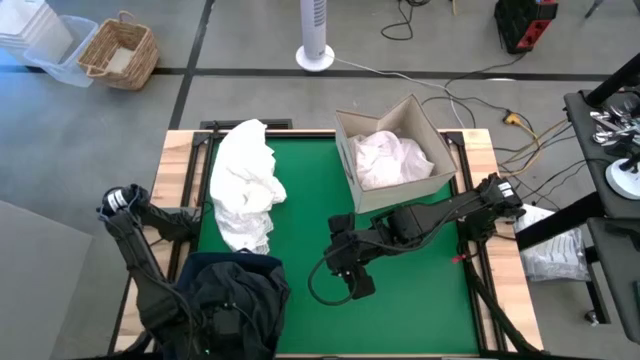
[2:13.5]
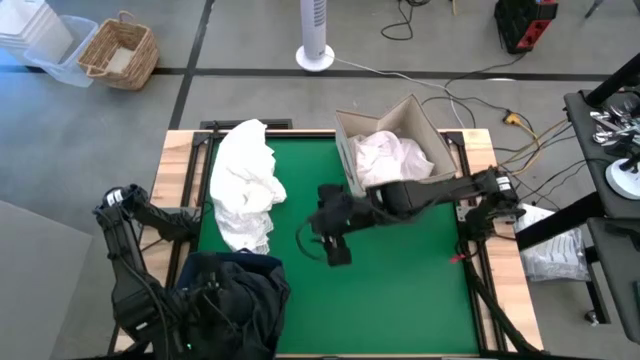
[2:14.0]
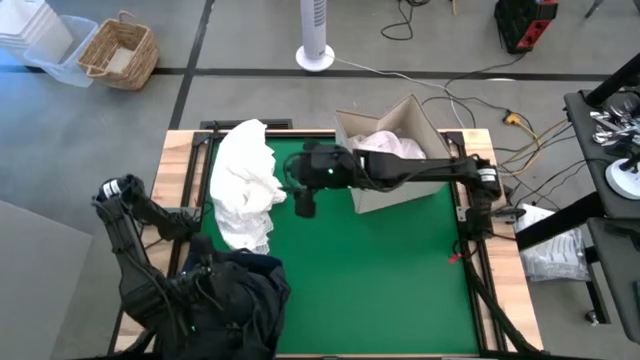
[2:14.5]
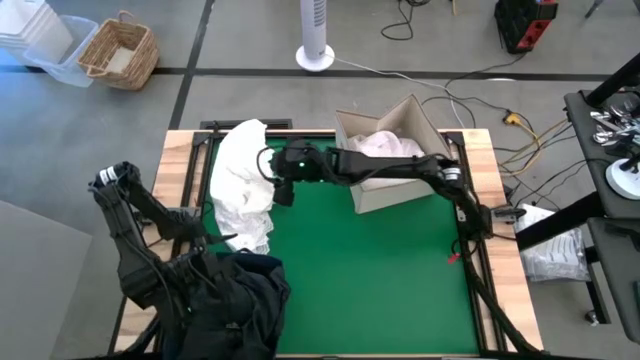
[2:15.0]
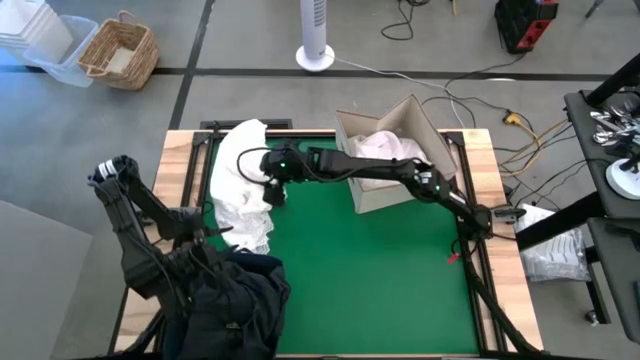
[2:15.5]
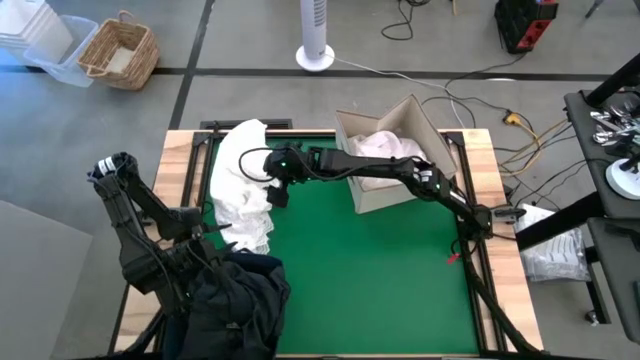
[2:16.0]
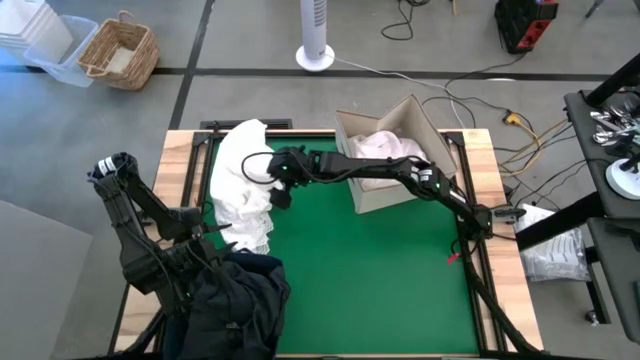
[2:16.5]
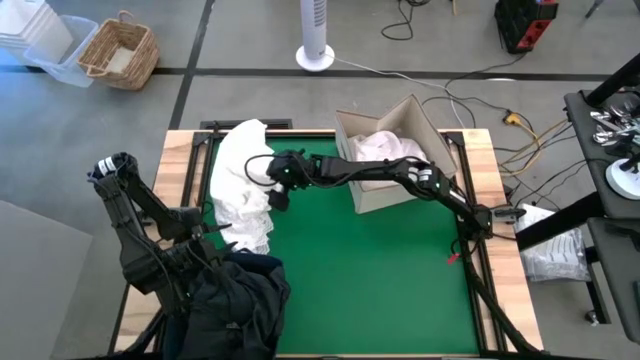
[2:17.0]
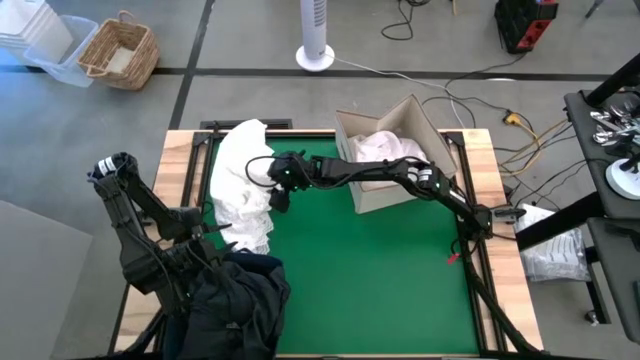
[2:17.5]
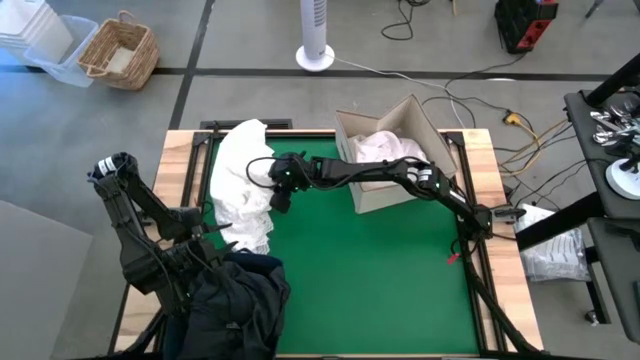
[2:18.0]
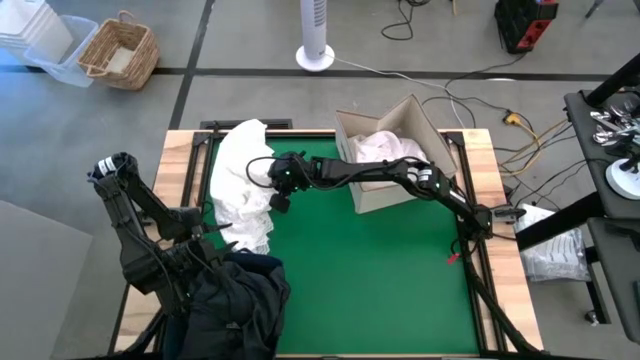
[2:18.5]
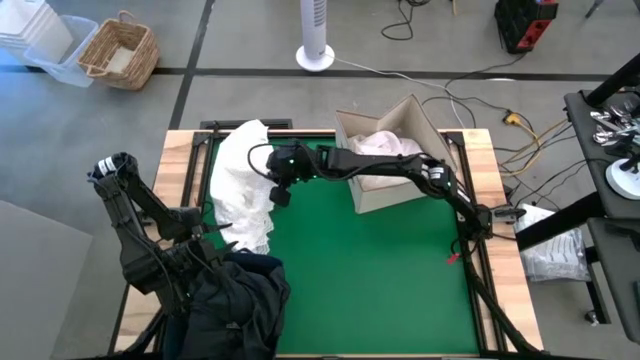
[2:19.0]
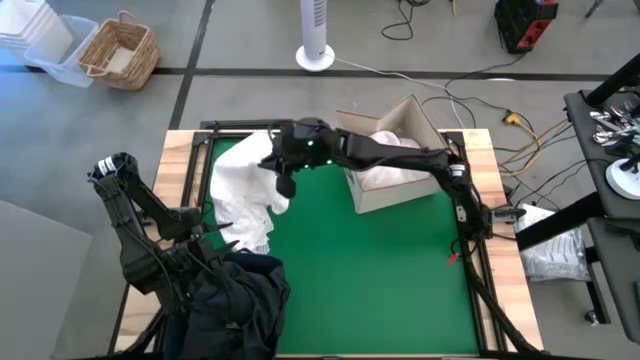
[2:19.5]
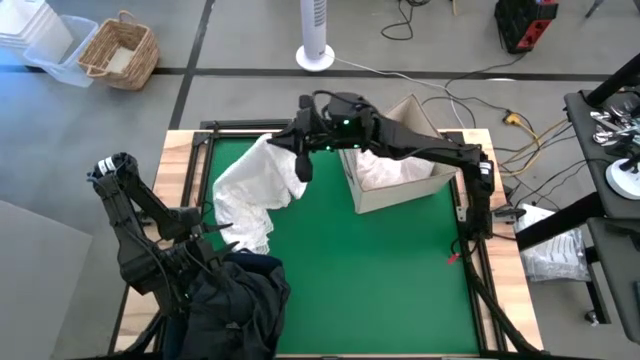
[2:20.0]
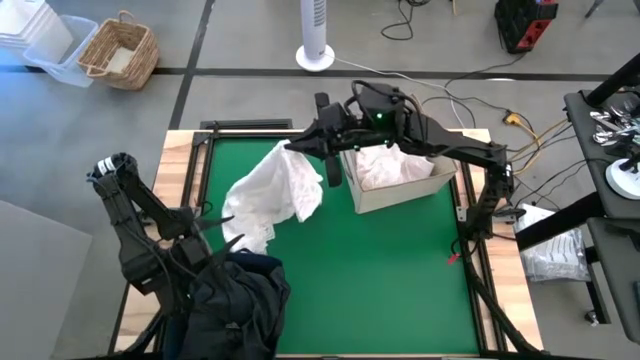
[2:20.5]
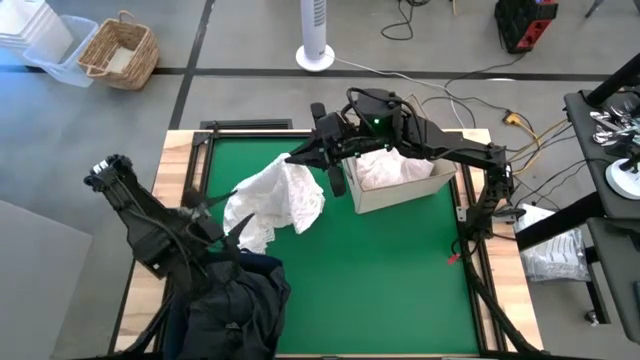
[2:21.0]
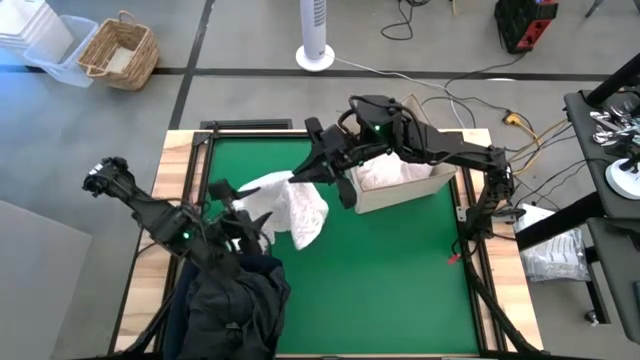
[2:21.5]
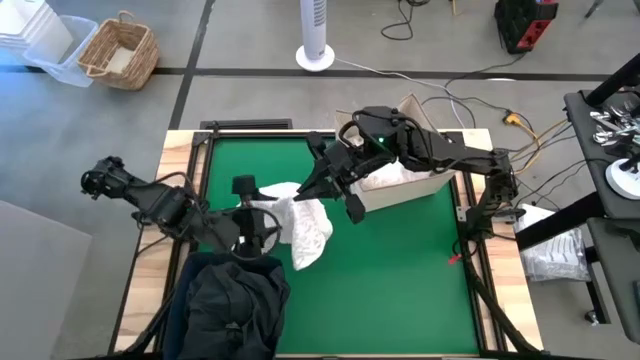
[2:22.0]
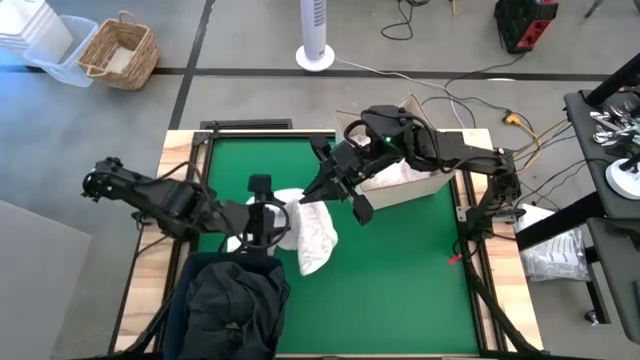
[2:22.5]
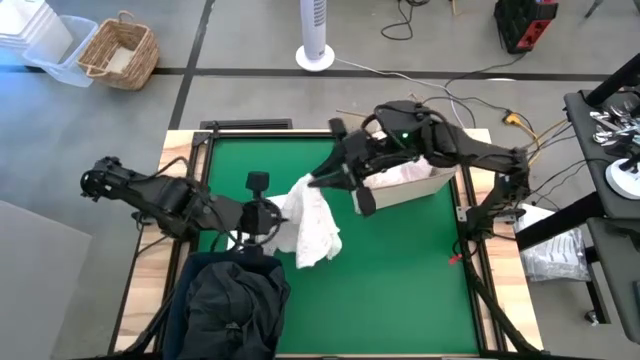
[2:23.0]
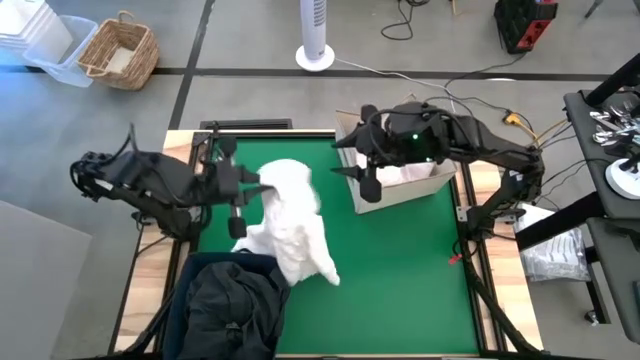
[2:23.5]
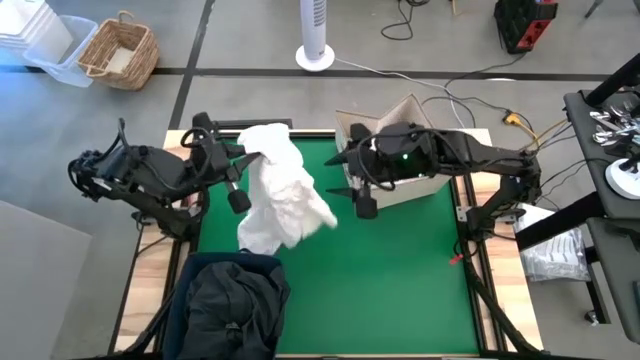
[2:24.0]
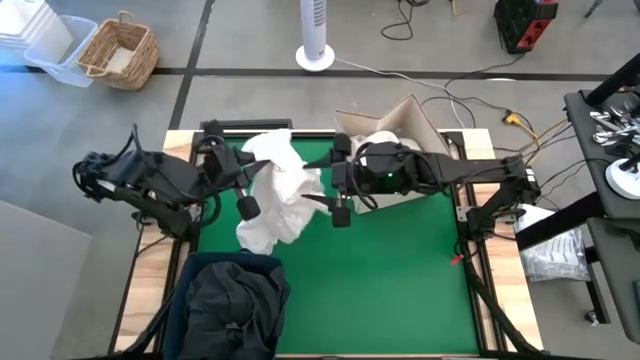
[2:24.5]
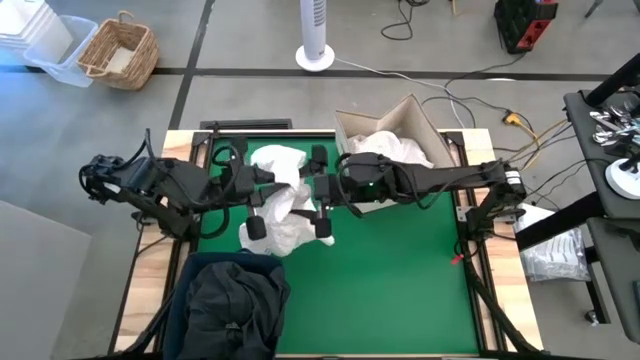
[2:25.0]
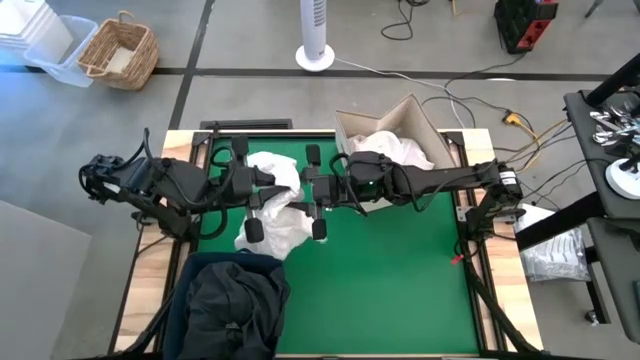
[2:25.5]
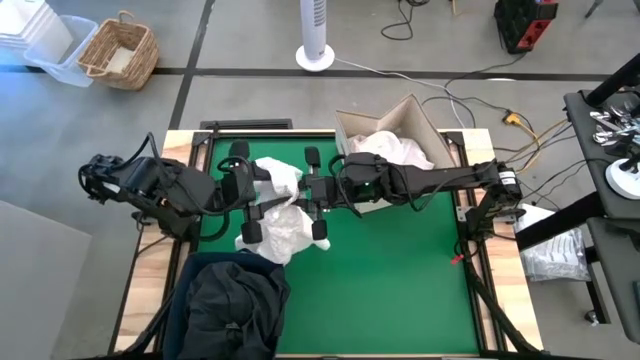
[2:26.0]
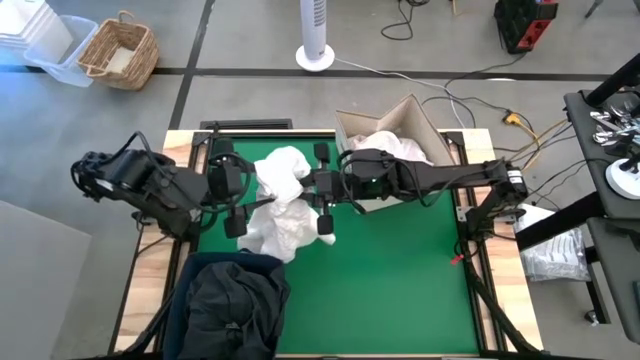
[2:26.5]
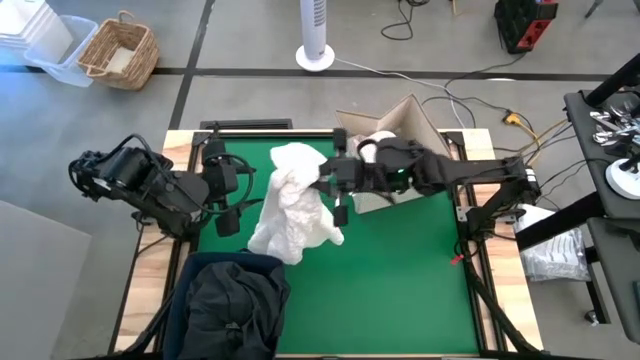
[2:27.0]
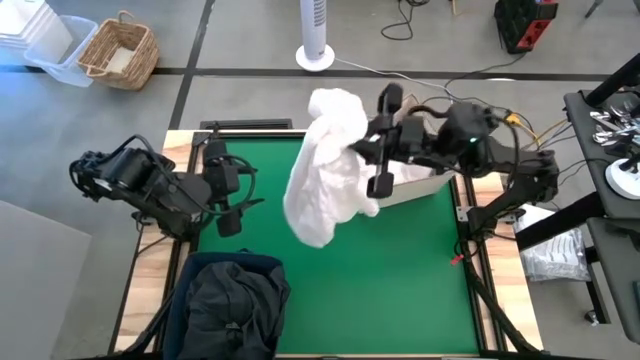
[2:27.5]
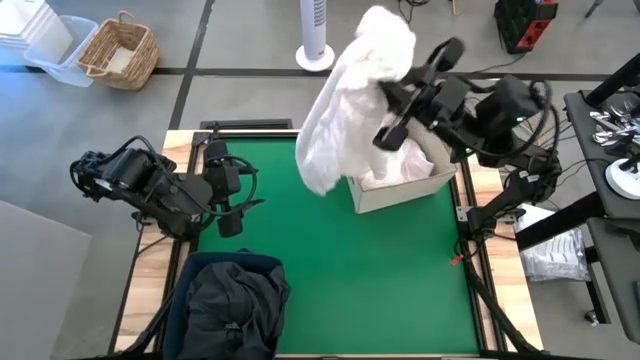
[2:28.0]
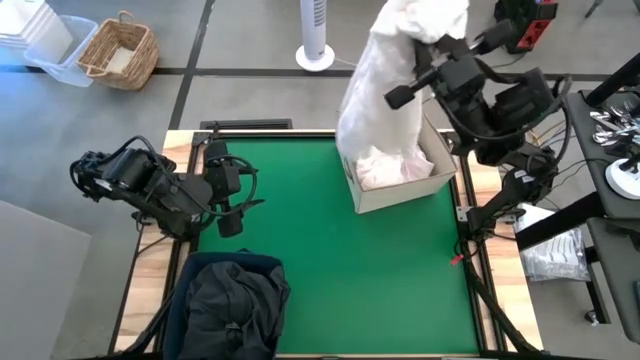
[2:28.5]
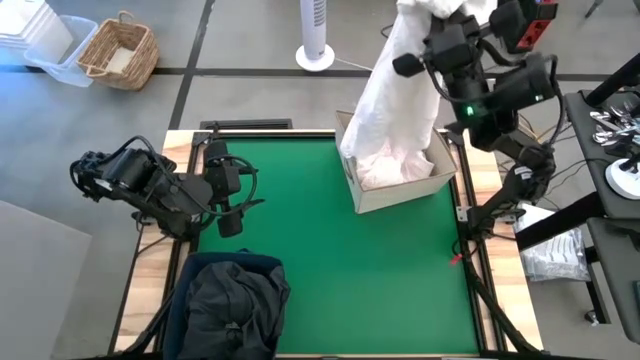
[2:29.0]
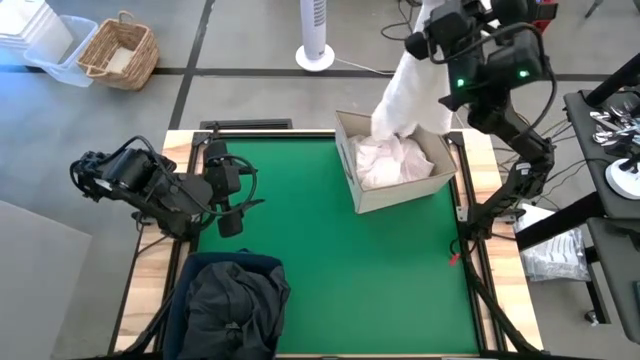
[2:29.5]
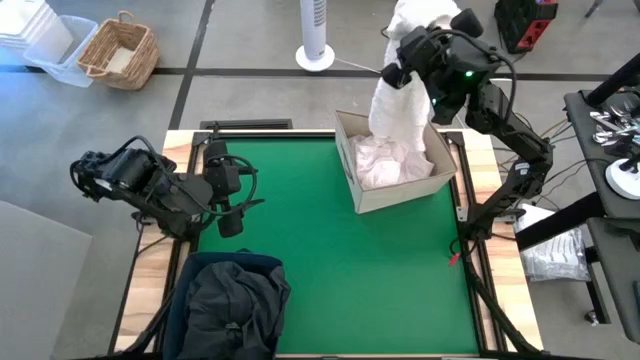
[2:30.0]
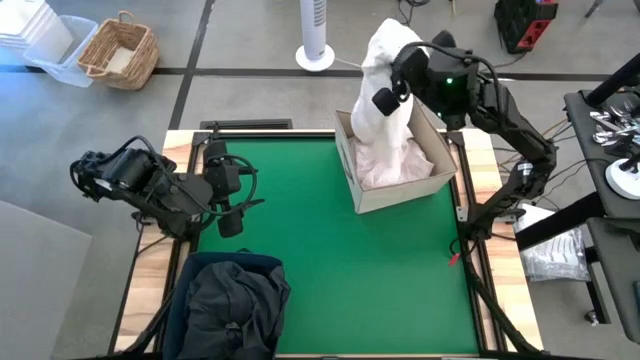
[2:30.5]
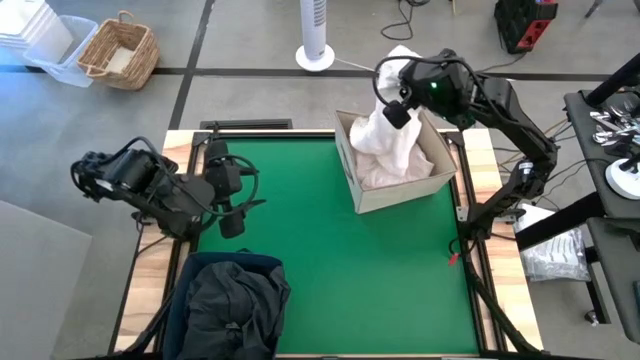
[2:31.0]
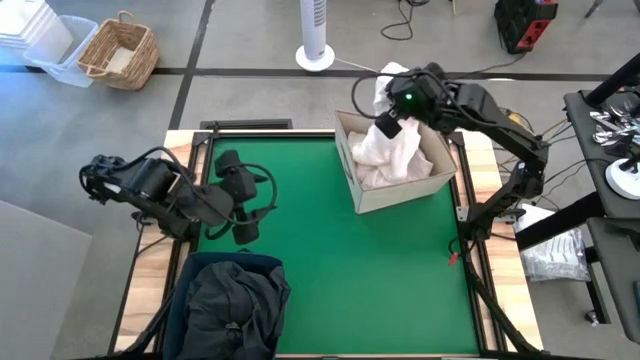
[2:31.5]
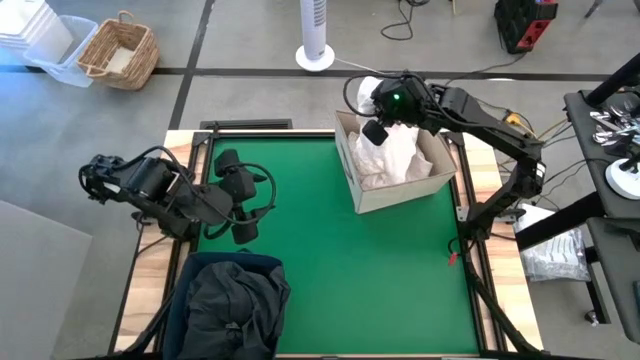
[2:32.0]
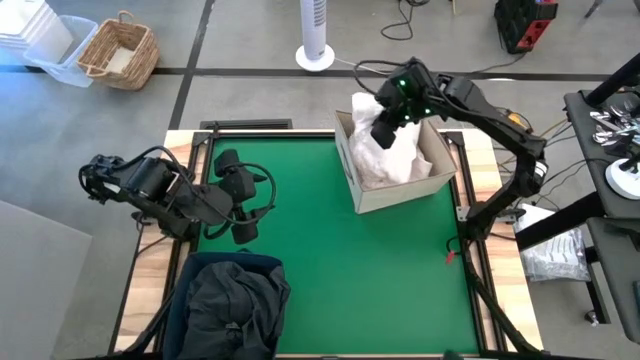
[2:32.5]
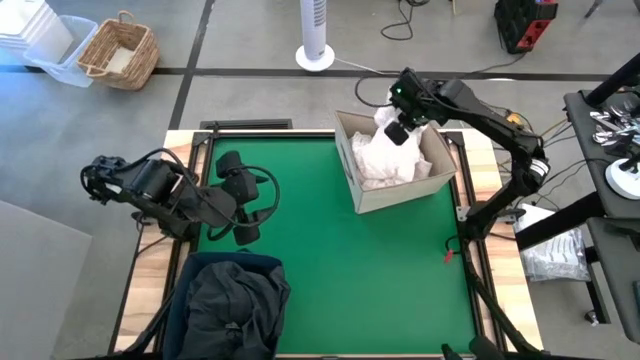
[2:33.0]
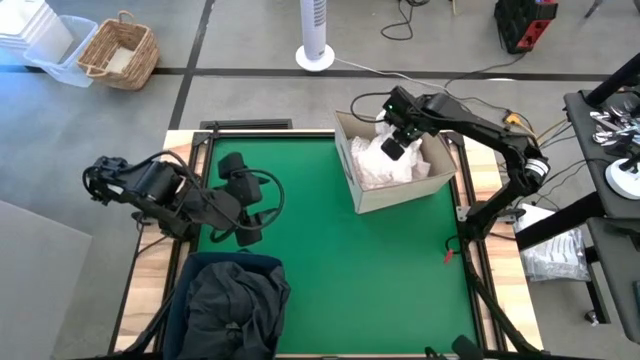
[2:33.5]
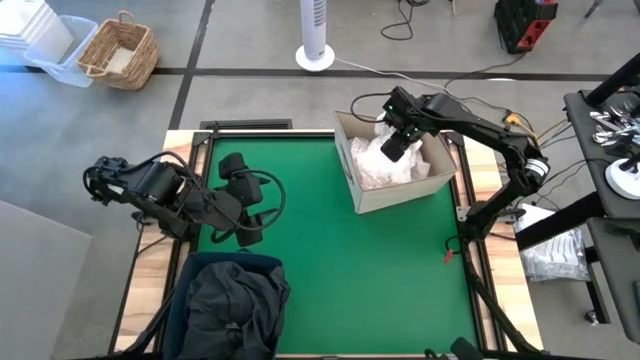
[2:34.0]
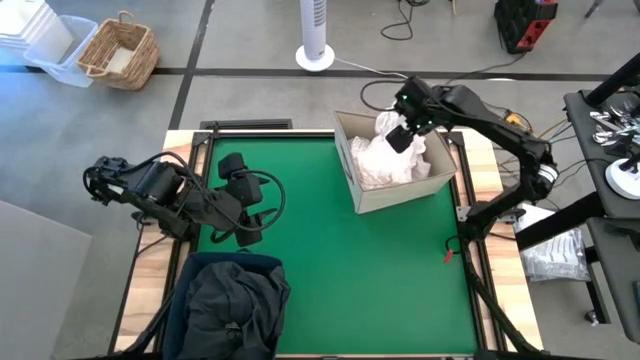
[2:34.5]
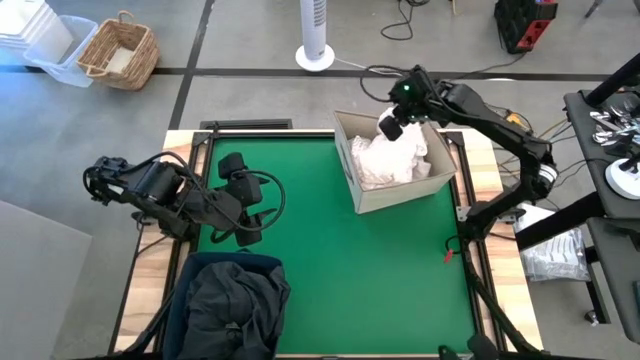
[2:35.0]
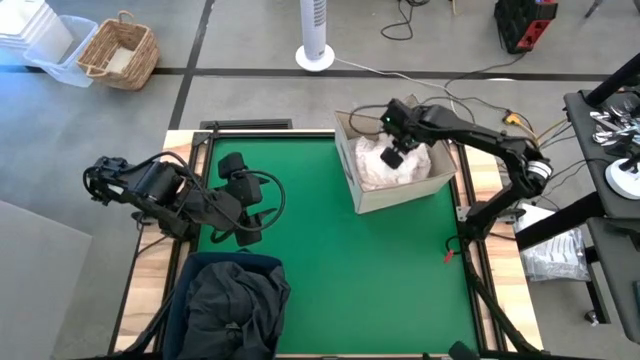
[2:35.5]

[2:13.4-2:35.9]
Put the white shirt into the brown laundry organizer
